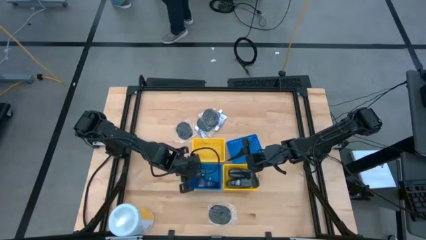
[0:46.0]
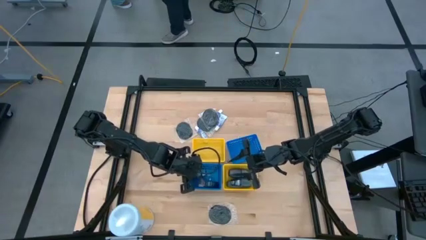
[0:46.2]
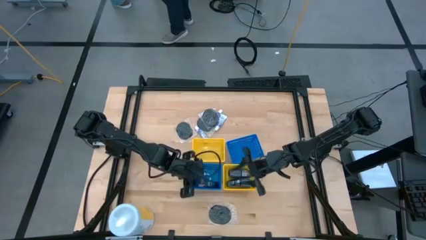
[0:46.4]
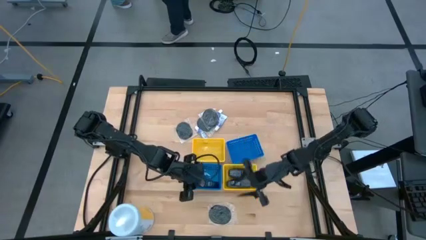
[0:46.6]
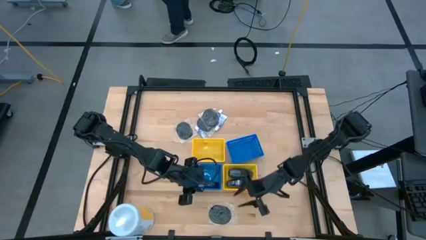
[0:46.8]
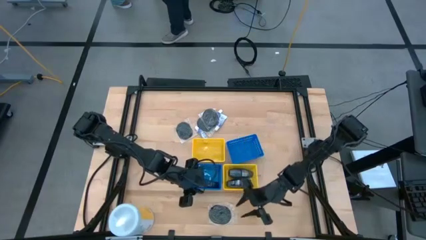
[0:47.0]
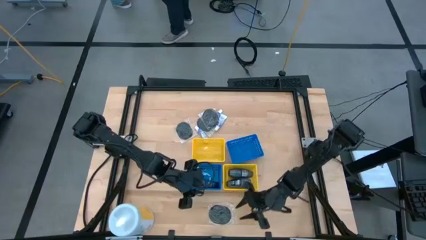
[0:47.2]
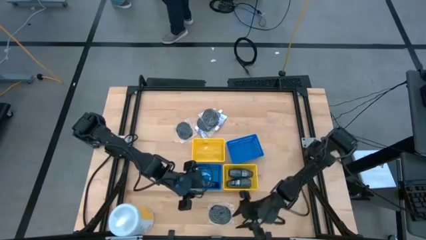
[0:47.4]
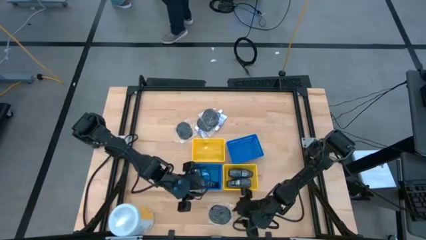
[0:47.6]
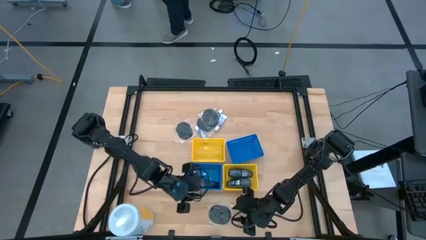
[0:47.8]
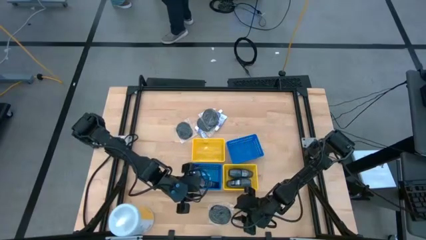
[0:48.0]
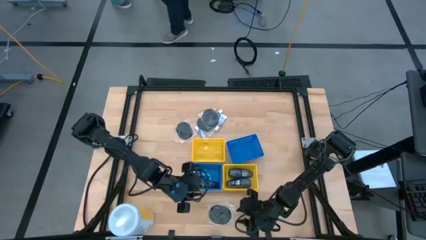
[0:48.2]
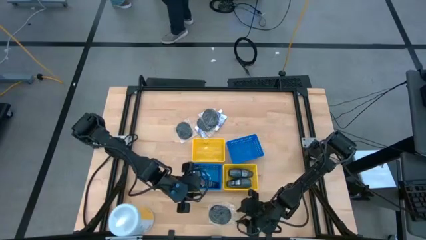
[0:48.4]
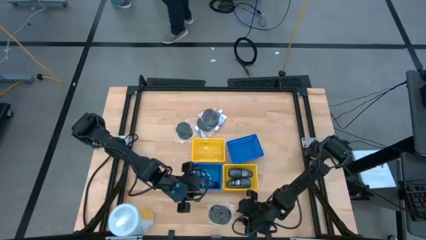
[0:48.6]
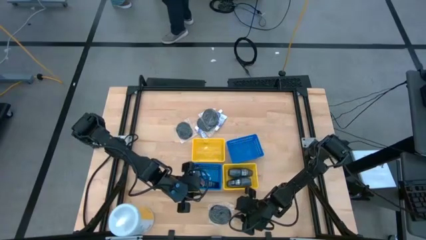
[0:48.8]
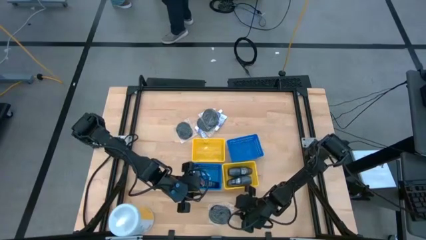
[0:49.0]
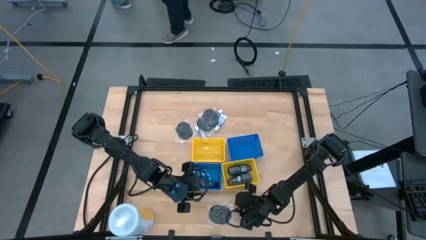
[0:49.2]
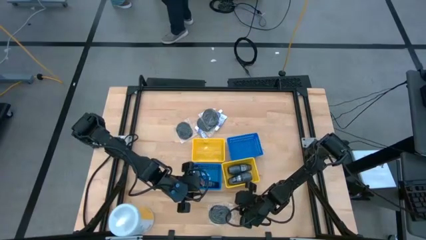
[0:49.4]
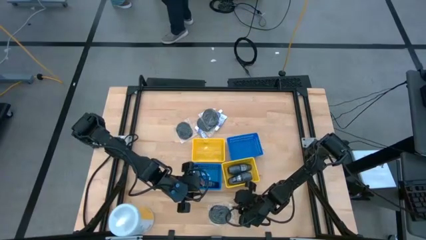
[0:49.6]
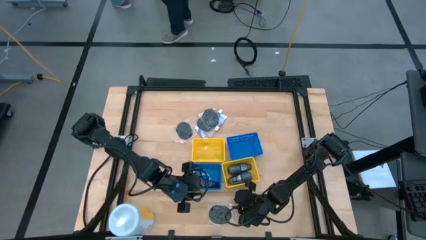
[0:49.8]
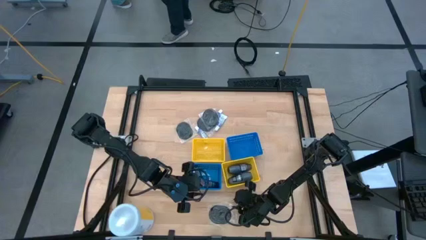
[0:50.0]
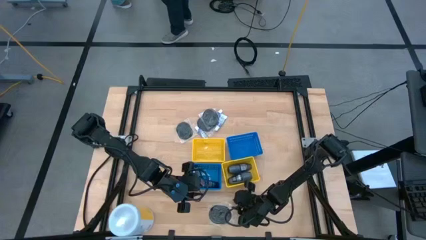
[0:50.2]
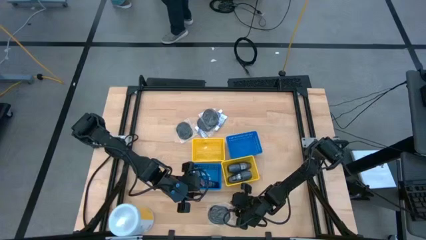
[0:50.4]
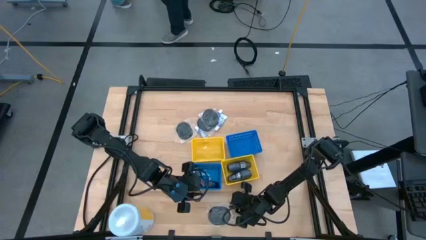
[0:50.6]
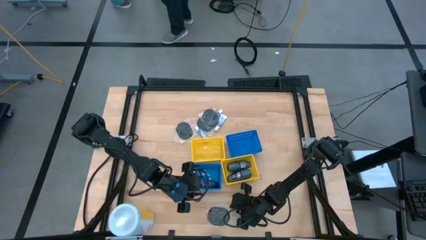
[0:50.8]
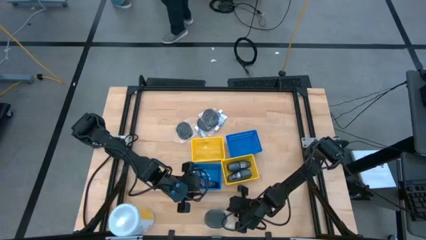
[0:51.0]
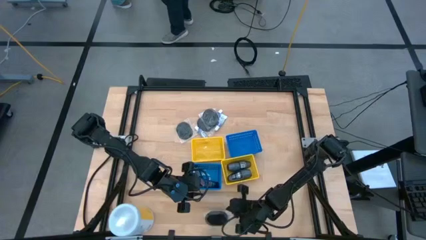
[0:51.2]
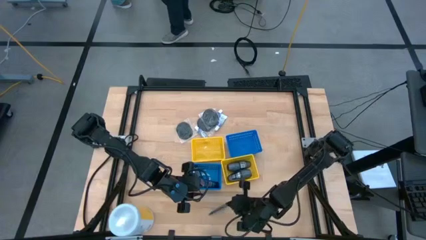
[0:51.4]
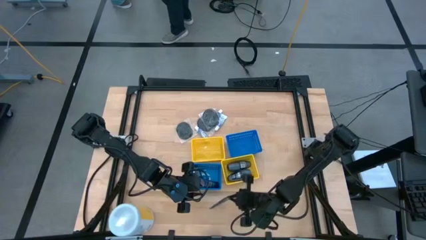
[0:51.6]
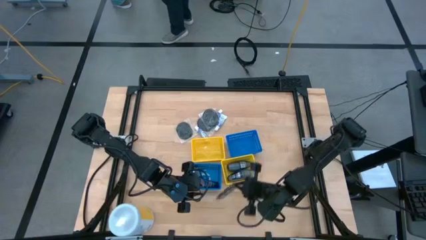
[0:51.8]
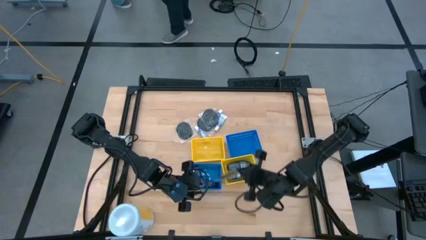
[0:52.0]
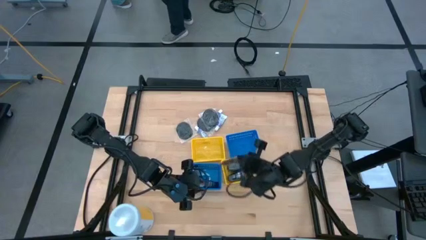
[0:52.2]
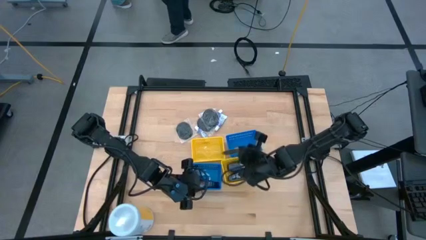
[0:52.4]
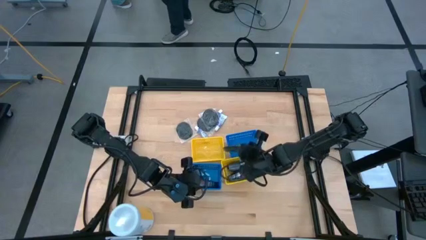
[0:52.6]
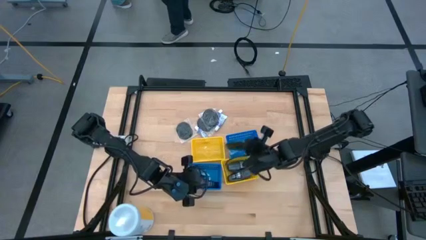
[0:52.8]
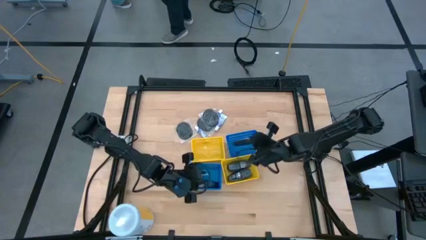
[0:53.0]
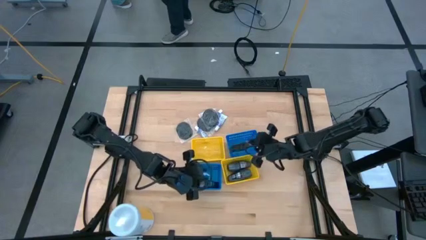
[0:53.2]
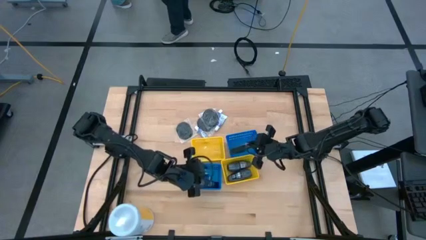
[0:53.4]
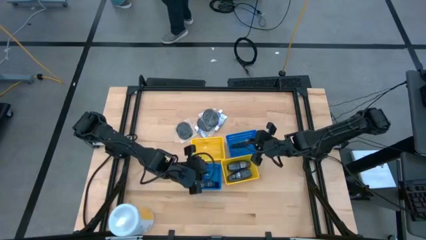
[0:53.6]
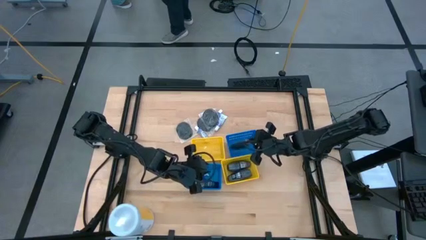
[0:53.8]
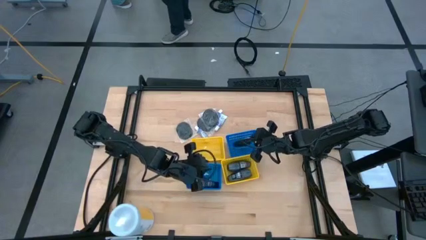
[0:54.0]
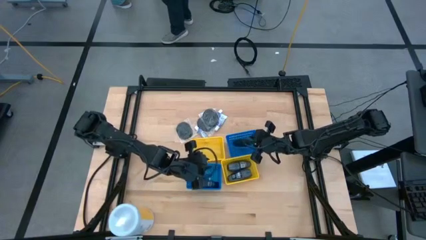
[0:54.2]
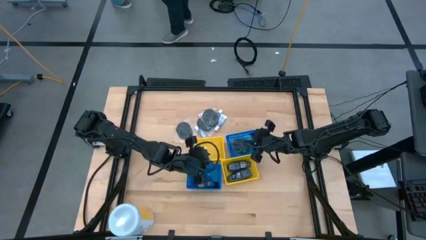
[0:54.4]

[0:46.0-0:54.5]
Task: Pick & Place Travel size toiletries
Put the bottom hairbrush on the top blue bin

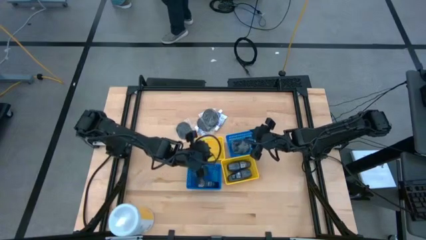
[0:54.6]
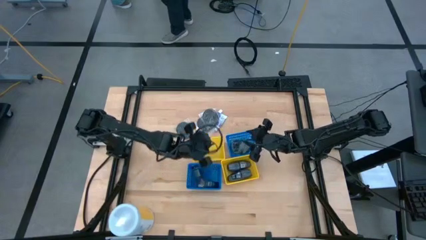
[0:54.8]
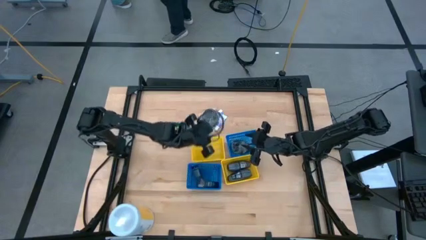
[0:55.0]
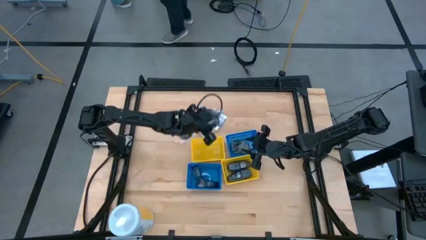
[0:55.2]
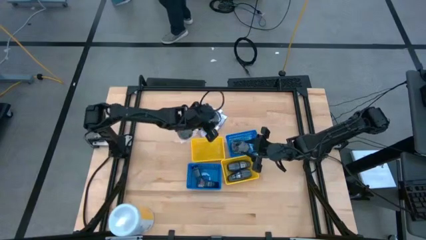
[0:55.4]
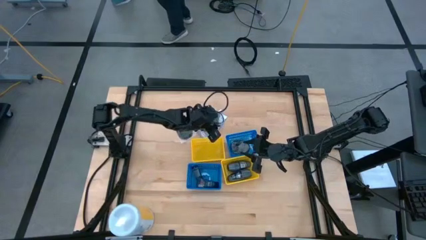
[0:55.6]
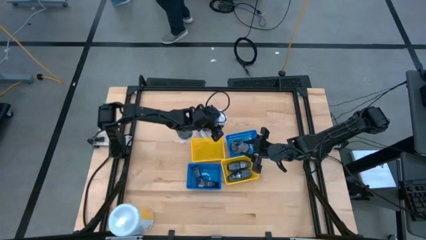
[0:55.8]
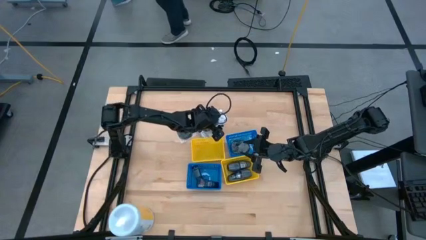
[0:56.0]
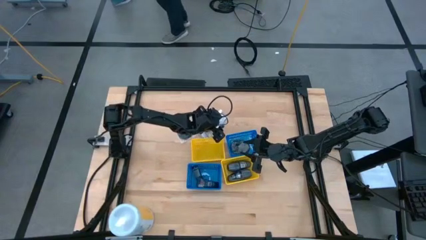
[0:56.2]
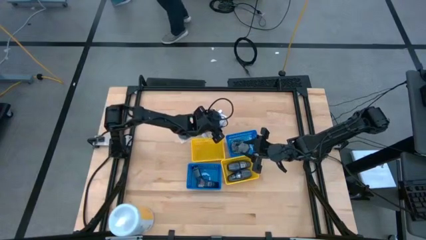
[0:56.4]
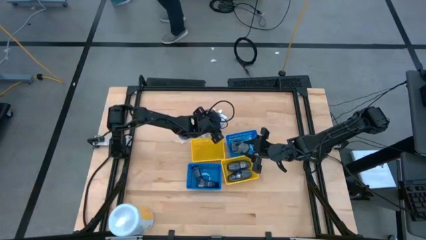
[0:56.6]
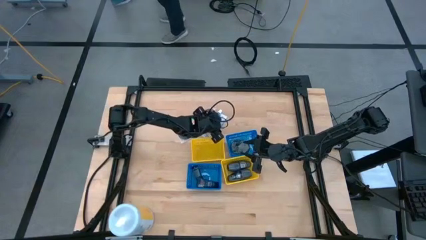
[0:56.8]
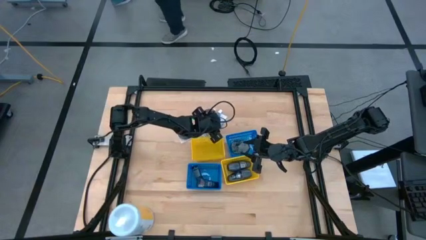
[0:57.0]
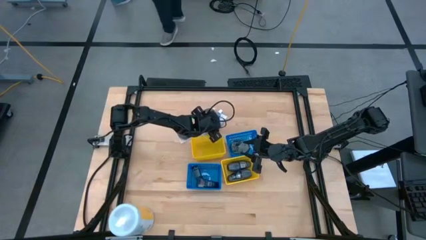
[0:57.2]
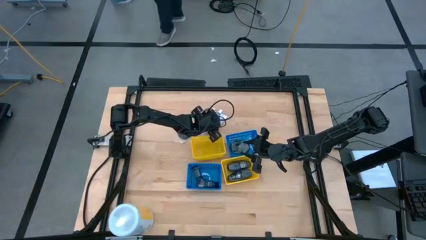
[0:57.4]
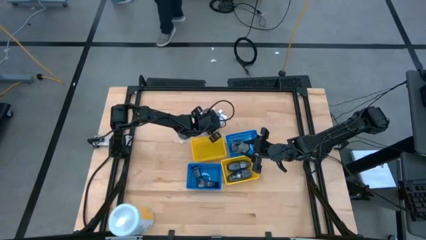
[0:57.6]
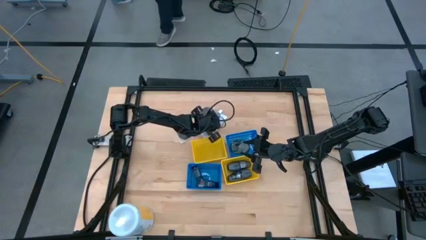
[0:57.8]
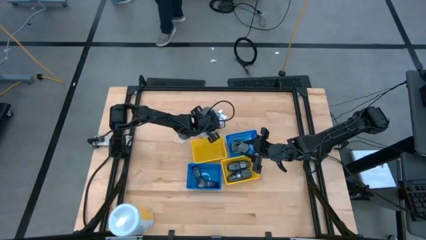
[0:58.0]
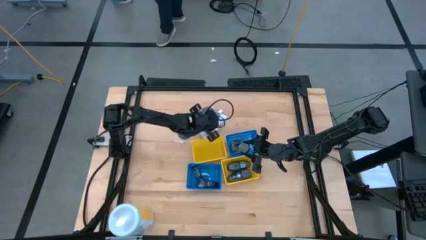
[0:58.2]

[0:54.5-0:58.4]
Put the top hairbrush into the top blue bin

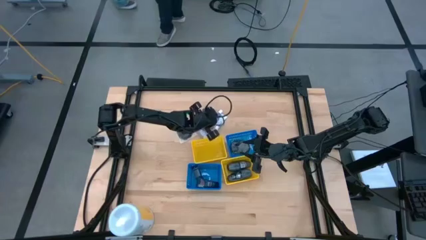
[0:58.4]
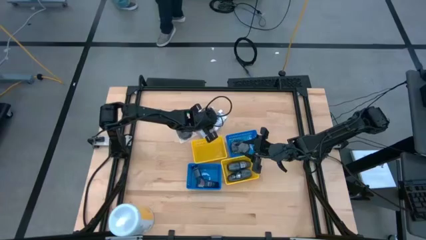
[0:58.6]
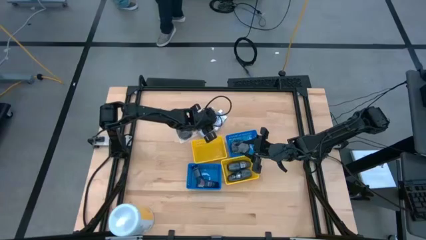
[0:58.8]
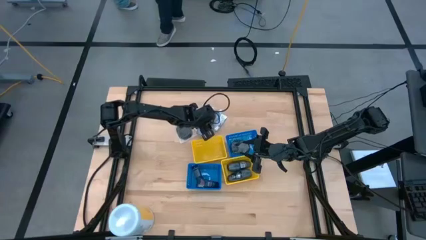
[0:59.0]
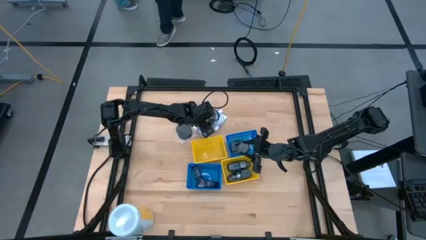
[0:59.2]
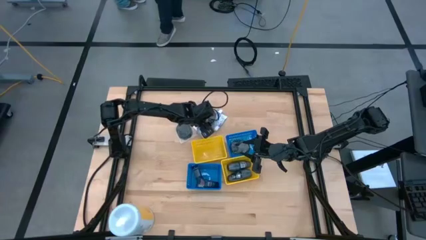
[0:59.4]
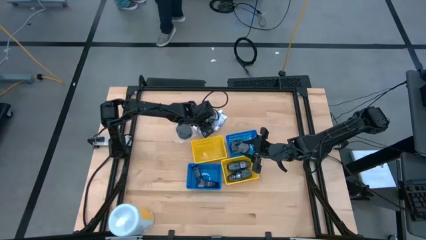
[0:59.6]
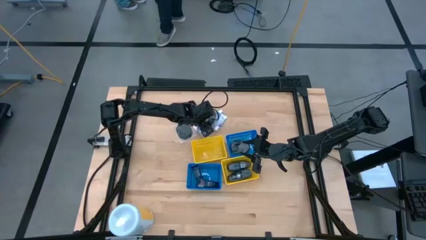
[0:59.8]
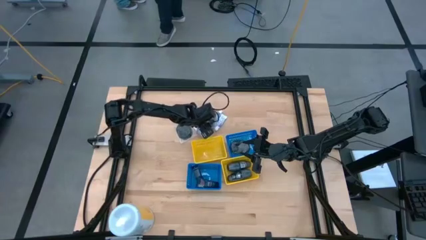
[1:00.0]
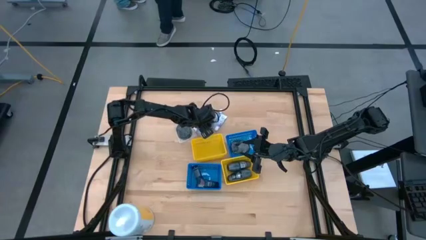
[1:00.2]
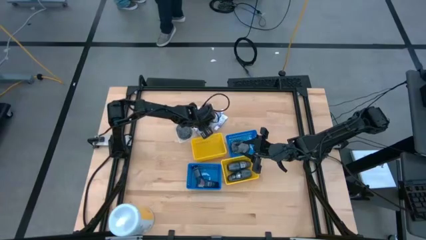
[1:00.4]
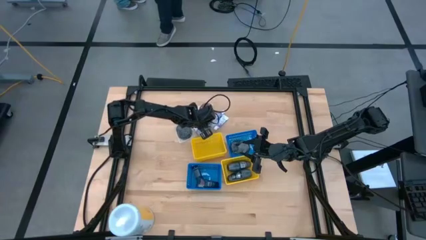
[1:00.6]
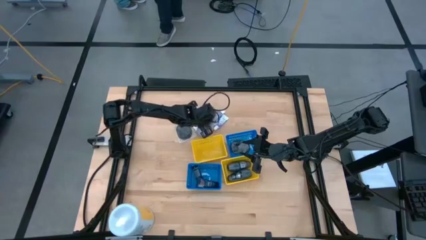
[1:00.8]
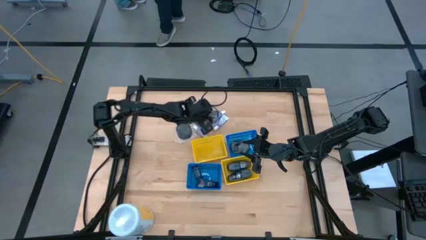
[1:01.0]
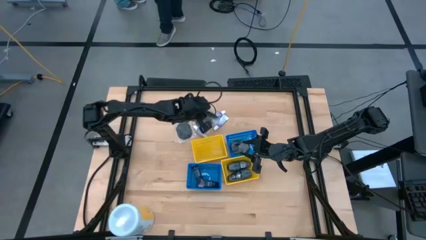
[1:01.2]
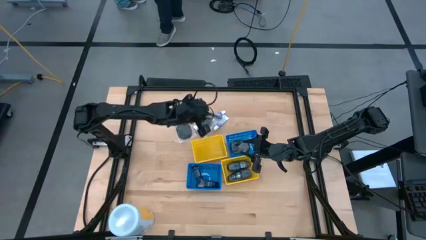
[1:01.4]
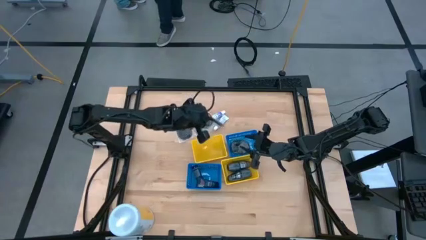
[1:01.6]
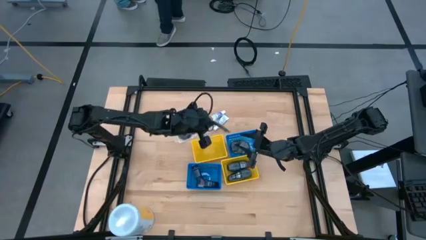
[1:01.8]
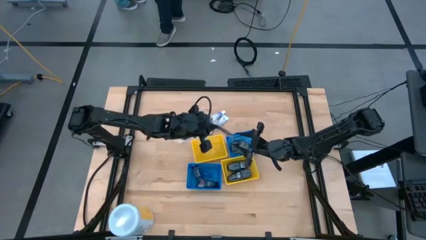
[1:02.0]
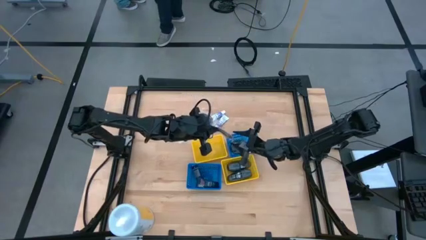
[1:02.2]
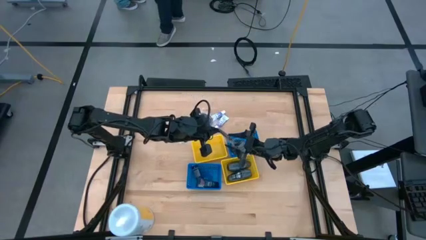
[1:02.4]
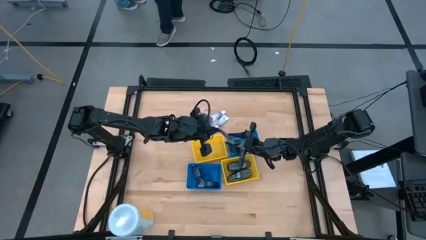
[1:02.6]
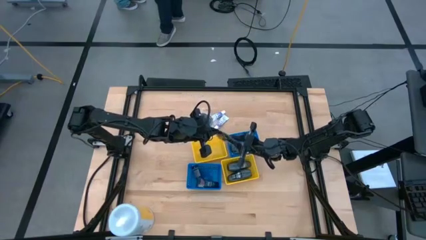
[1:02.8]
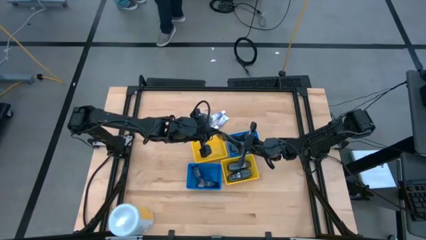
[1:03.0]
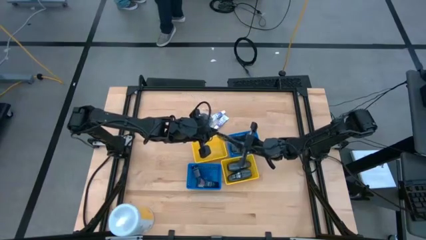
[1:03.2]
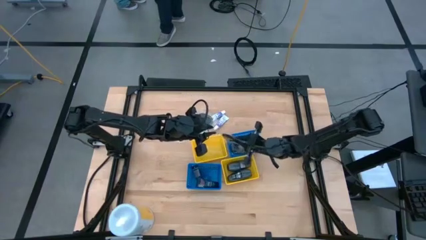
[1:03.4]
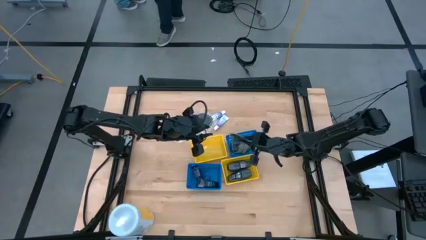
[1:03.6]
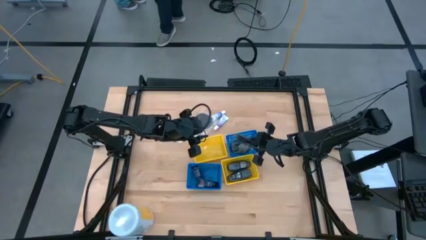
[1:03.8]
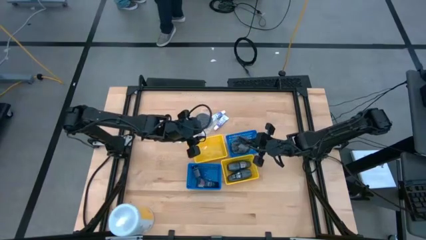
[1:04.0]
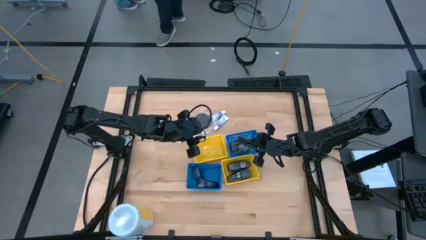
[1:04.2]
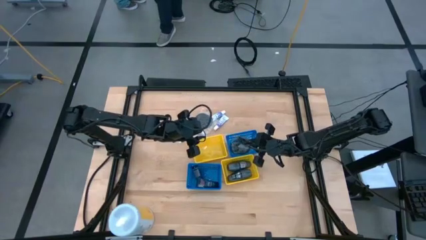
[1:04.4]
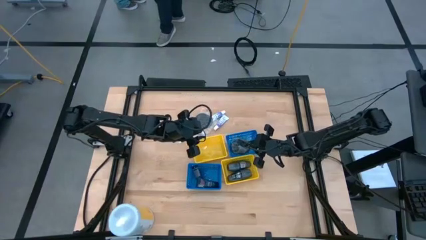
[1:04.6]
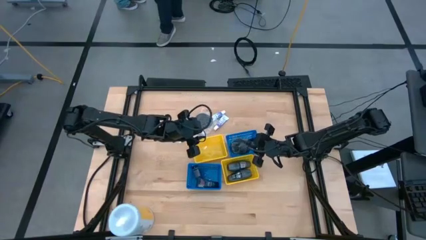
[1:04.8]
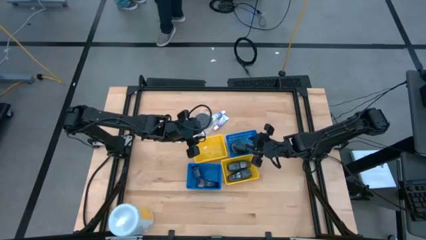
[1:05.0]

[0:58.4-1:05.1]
Put the top hairbrush on top of the other comb in the top blue bin
